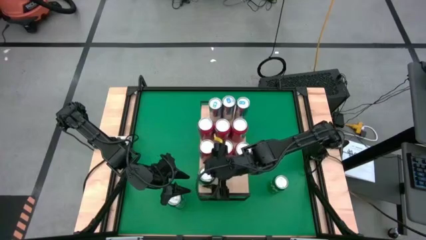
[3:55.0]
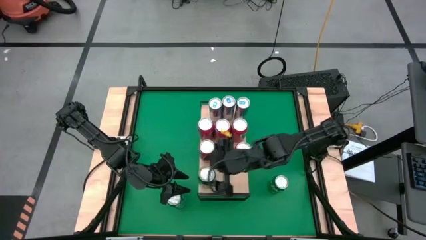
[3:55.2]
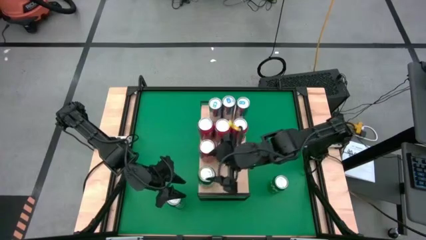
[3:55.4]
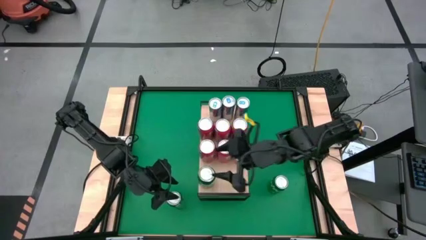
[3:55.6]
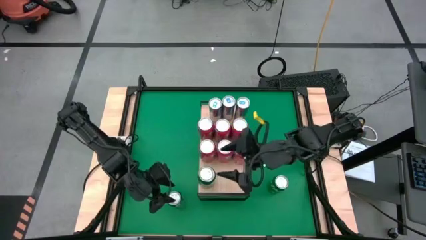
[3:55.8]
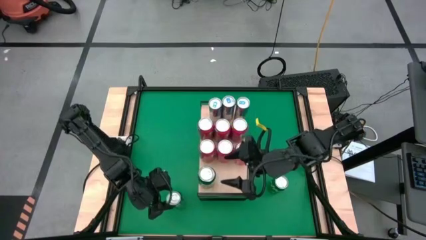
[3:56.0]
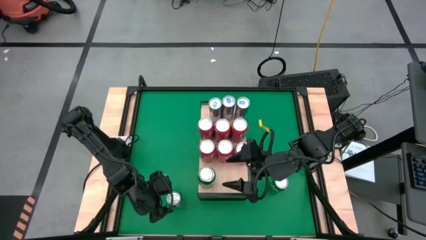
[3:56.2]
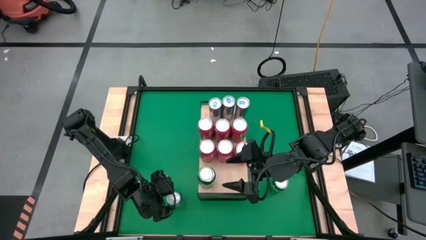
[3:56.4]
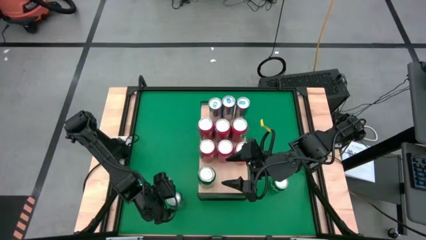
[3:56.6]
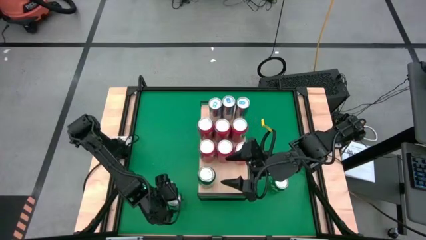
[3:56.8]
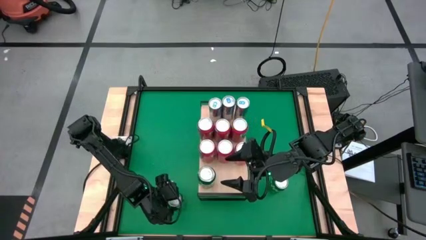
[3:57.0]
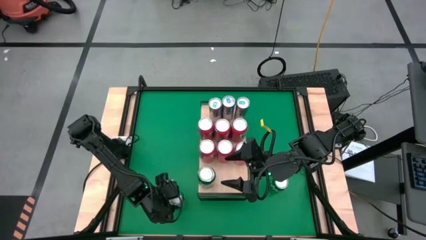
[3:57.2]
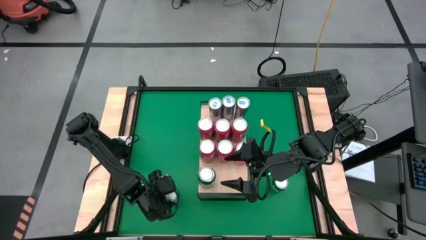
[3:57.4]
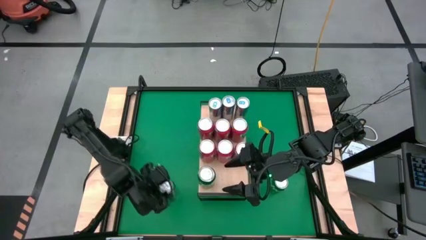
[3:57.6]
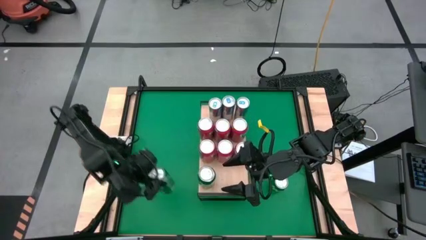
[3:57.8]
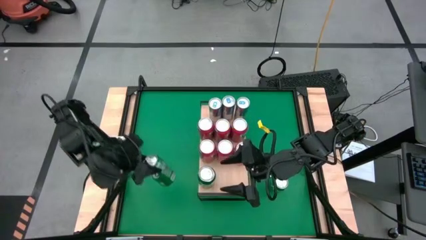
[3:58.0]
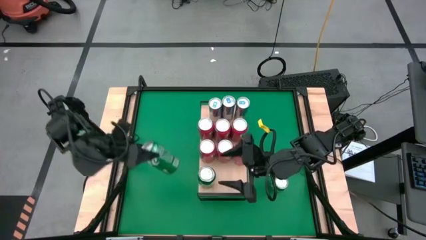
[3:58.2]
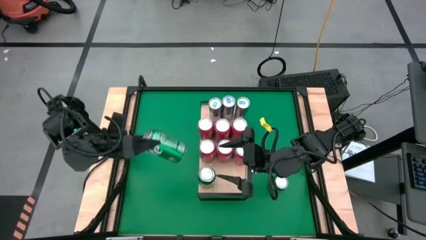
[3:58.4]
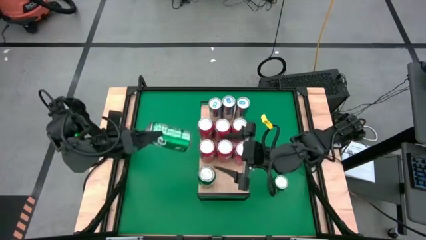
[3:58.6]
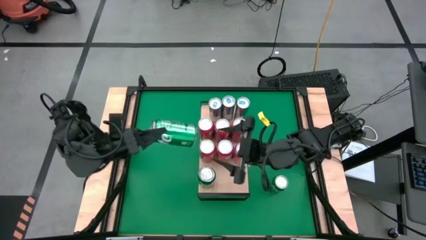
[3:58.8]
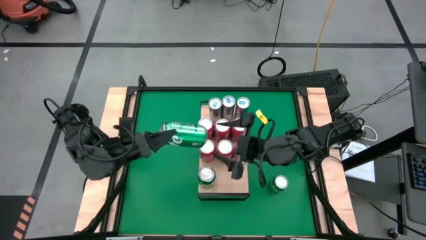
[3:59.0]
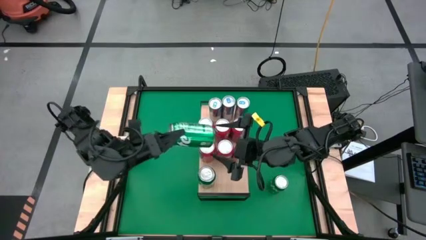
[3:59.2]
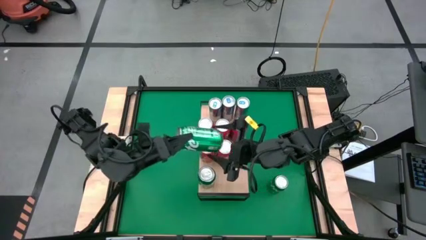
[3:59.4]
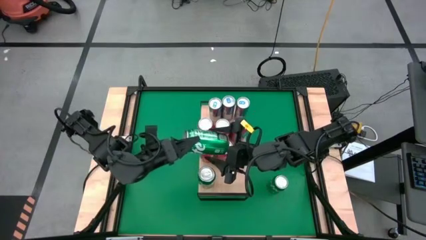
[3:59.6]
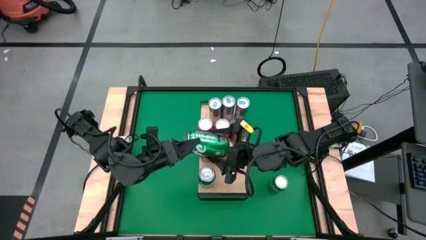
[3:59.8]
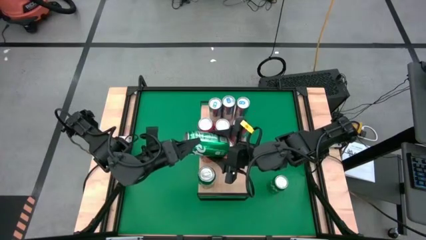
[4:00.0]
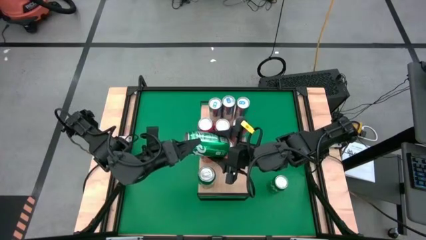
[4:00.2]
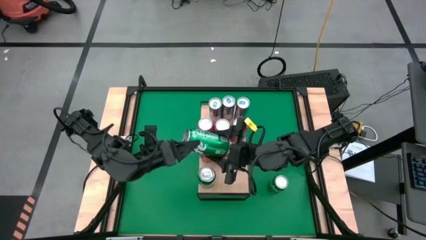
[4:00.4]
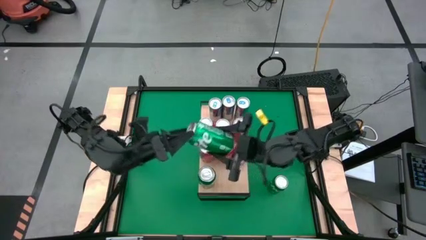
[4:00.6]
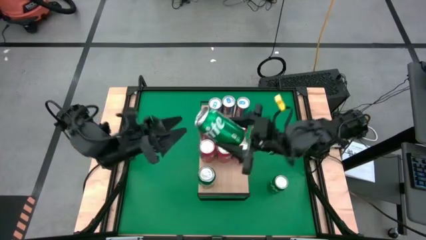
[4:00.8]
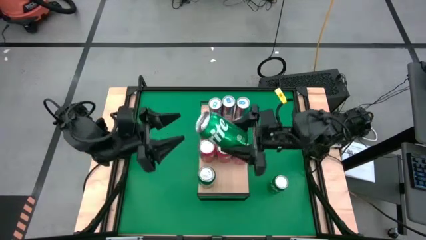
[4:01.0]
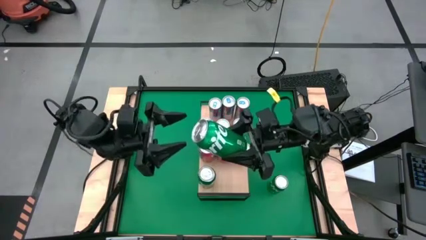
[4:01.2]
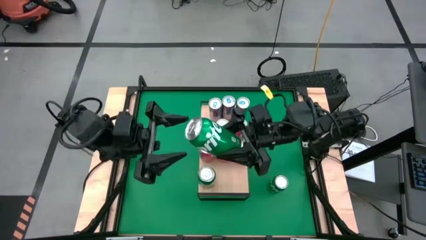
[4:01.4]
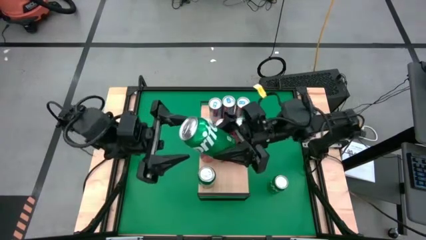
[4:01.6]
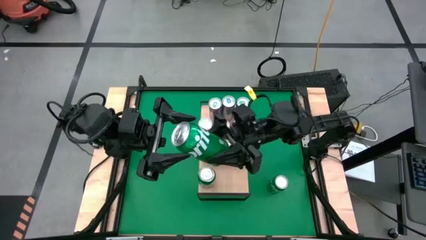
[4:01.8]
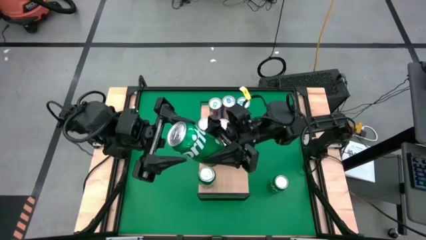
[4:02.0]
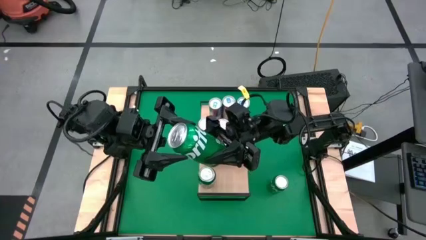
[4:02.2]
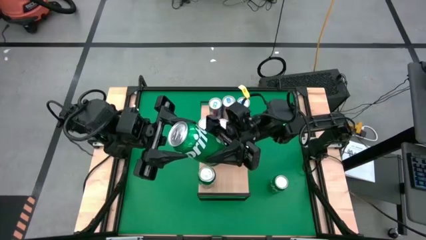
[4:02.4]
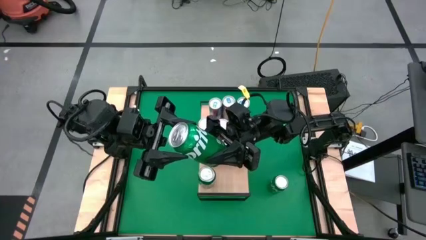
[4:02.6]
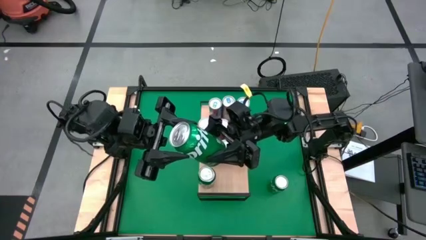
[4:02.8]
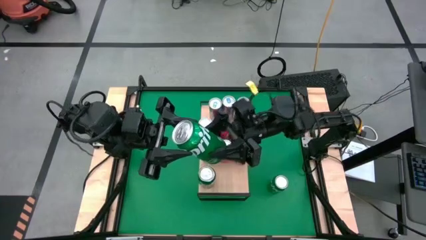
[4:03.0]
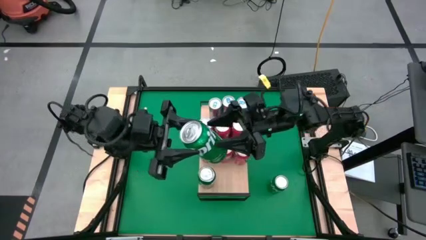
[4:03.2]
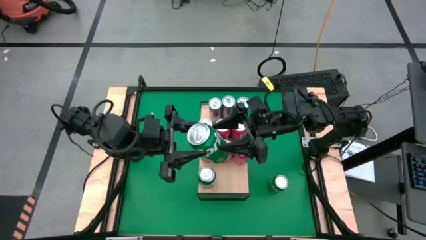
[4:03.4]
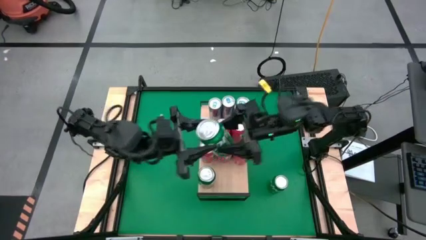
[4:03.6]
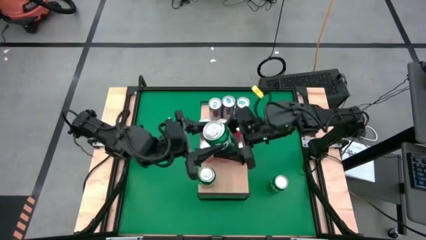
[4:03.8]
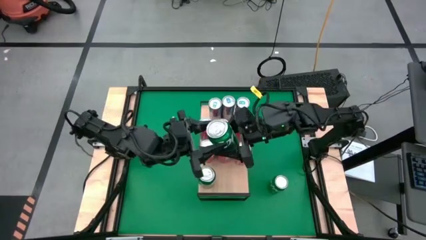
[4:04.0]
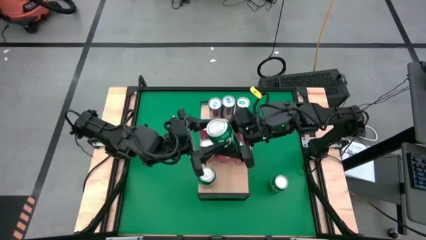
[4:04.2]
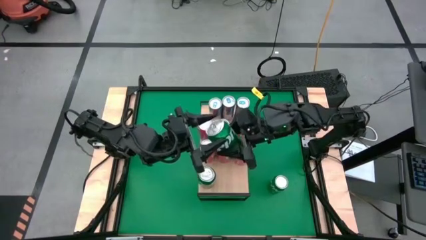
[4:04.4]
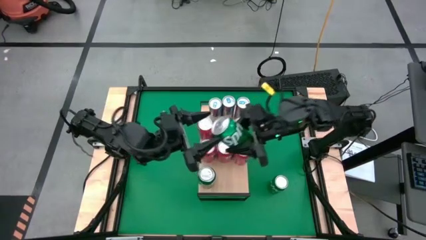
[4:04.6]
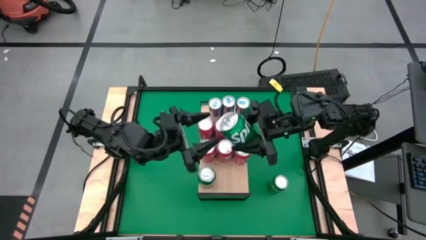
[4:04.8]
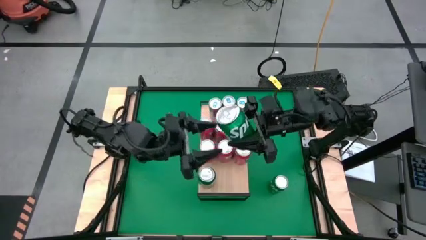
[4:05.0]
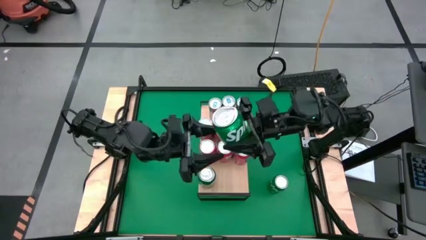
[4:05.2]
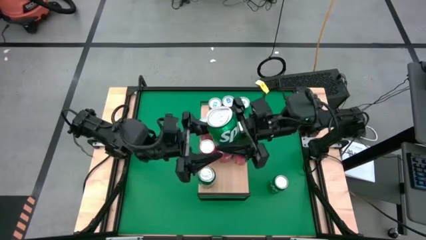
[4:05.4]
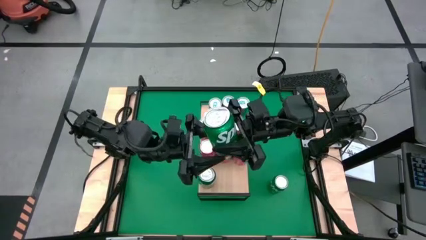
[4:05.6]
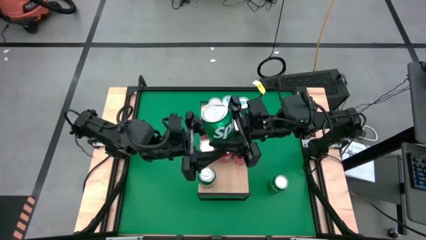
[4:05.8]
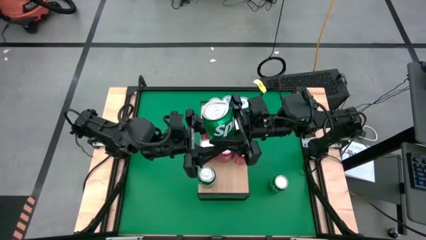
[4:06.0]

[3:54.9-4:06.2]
Task: Place canned beverage on shelf
Put the green soda can on the shelf aligned with the other green soda can

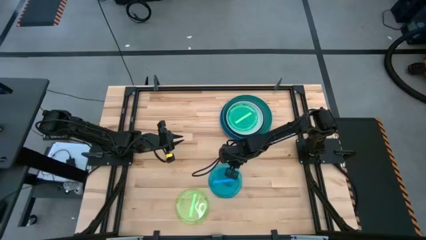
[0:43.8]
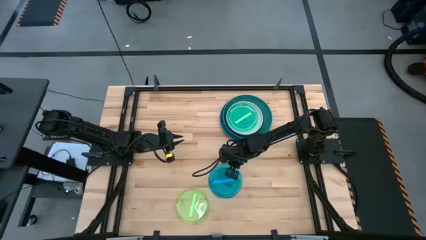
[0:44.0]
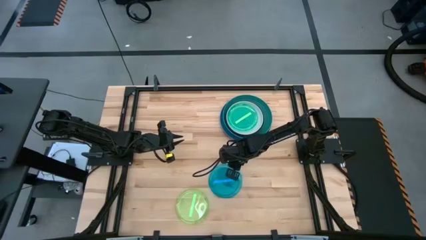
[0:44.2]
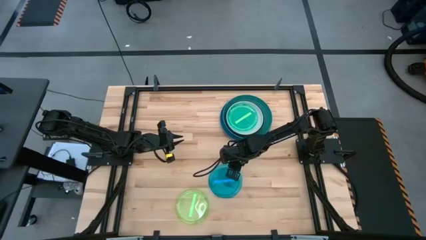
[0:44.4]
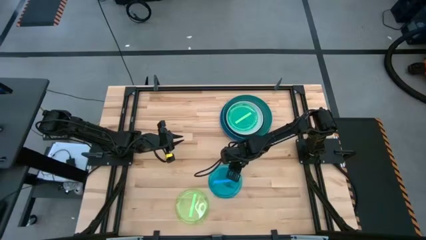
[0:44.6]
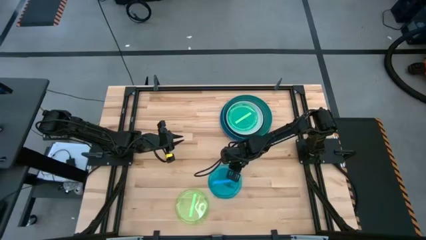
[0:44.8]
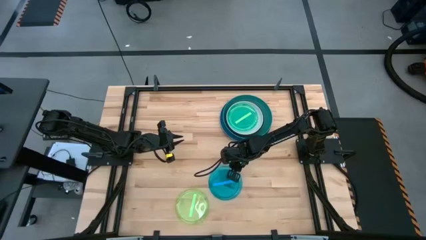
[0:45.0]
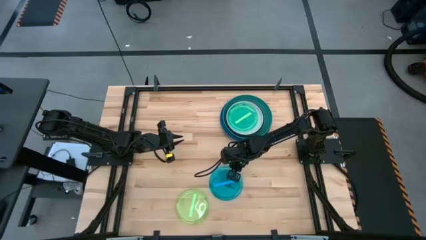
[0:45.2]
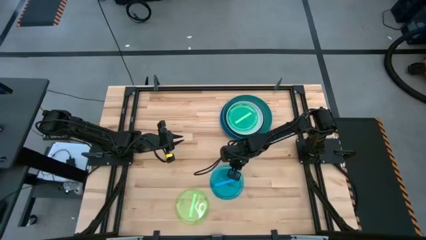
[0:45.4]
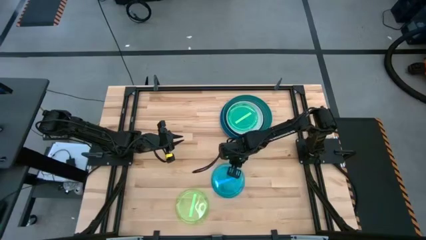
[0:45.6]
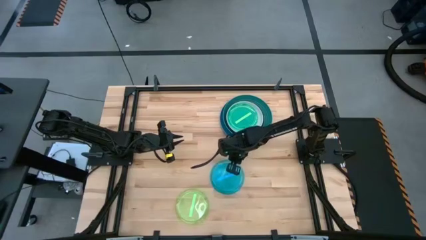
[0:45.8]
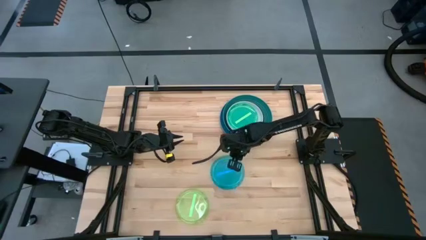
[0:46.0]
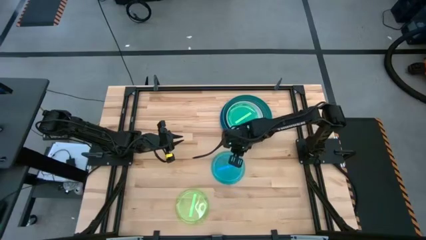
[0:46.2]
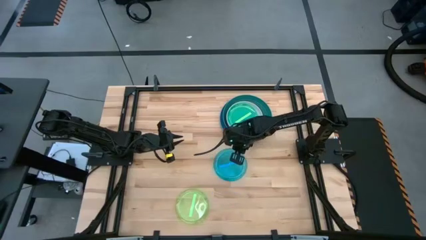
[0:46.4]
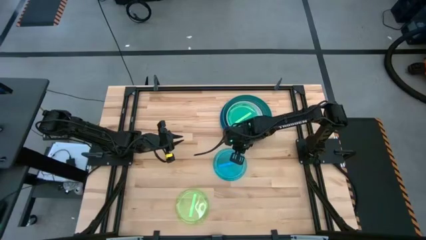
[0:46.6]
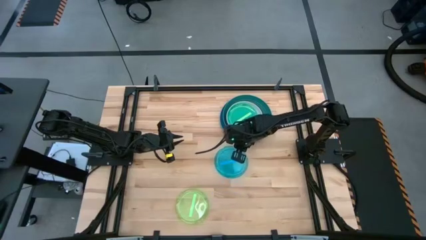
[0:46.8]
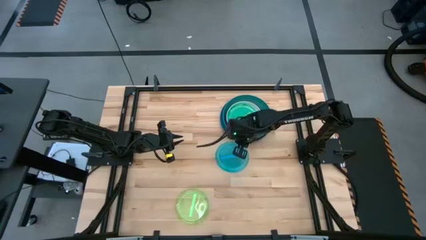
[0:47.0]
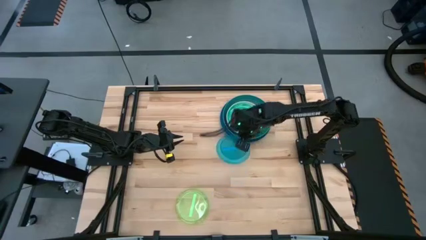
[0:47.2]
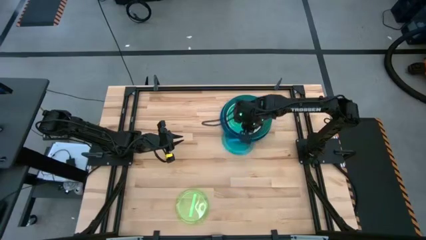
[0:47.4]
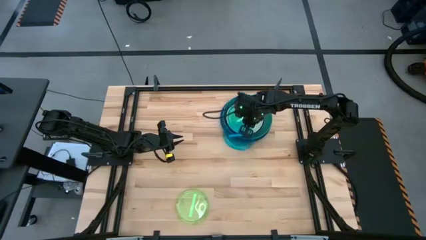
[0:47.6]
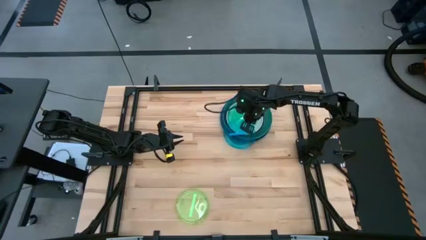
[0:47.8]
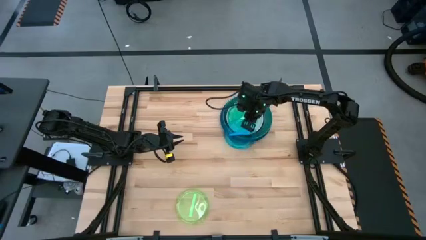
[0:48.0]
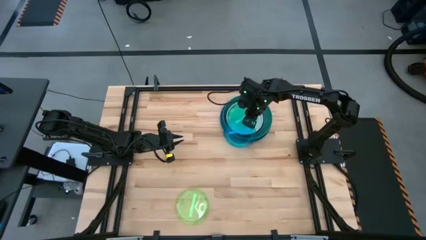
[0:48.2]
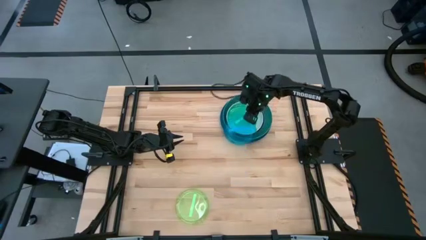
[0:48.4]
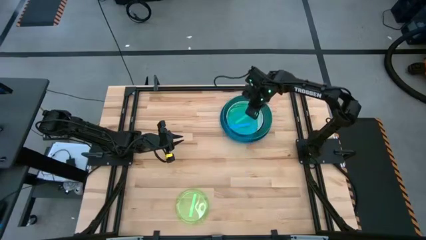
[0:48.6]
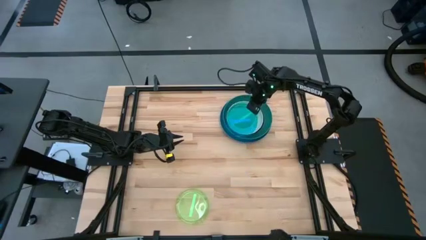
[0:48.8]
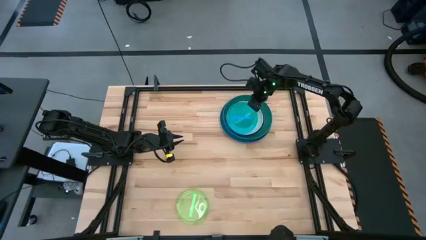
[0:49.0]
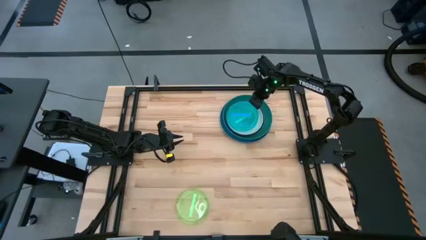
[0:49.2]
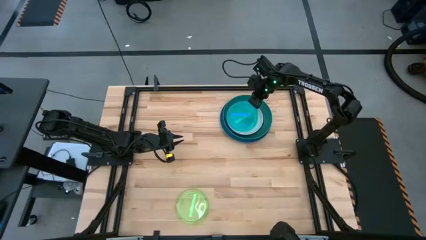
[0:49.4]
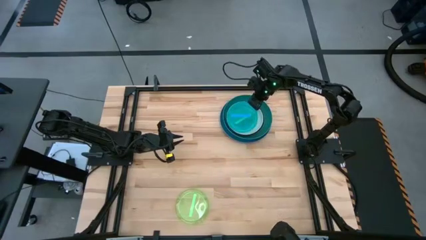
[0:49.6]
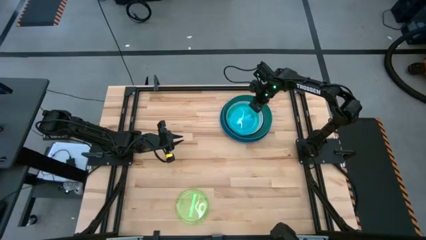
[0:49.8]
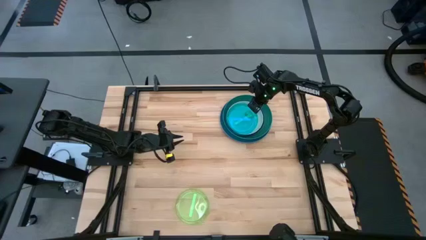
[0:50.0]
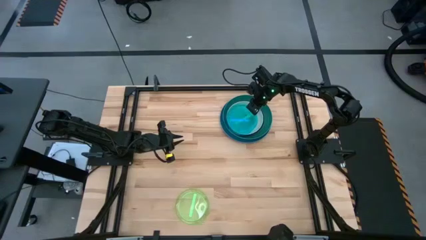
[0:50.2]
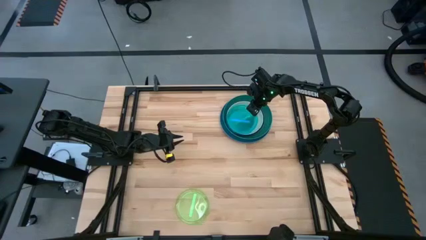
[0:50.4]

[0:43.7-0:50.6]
Task: Stack plastic plates
Stack the light blue plate on top of the light green plate
